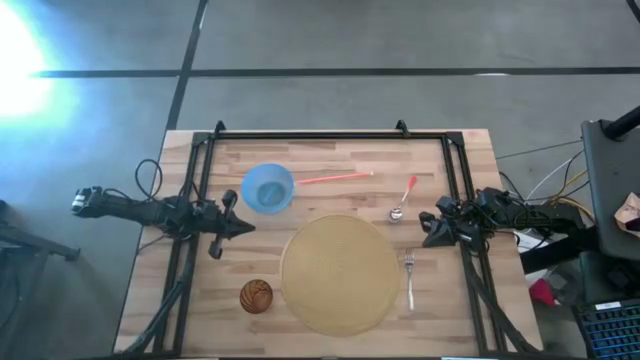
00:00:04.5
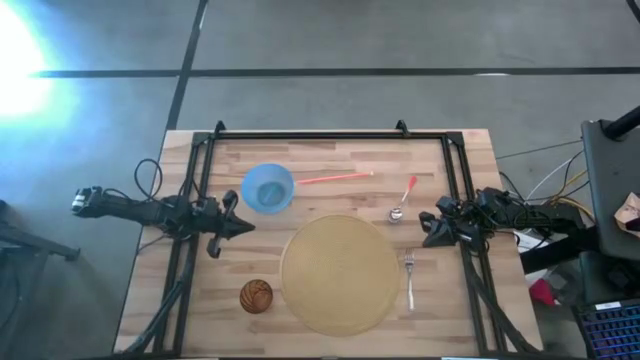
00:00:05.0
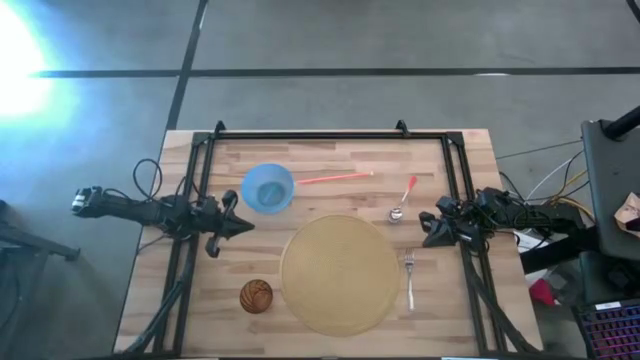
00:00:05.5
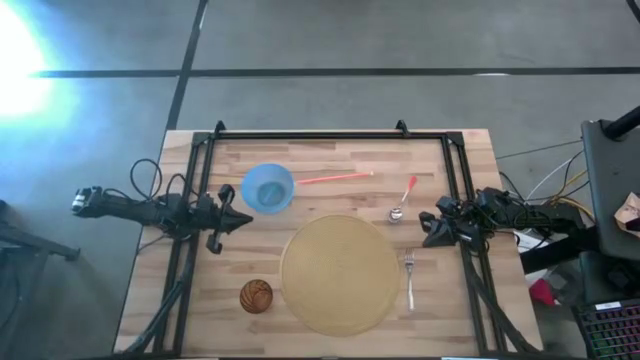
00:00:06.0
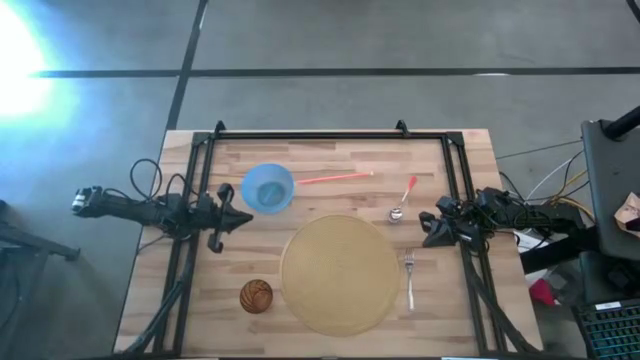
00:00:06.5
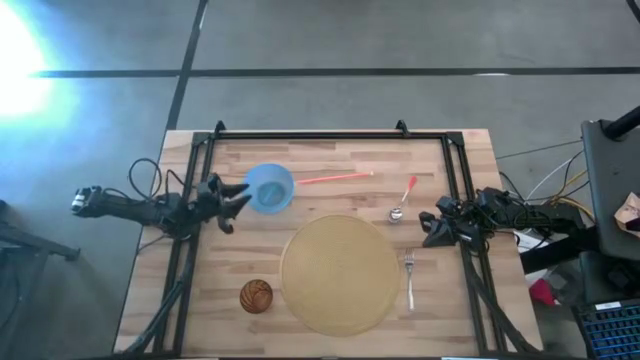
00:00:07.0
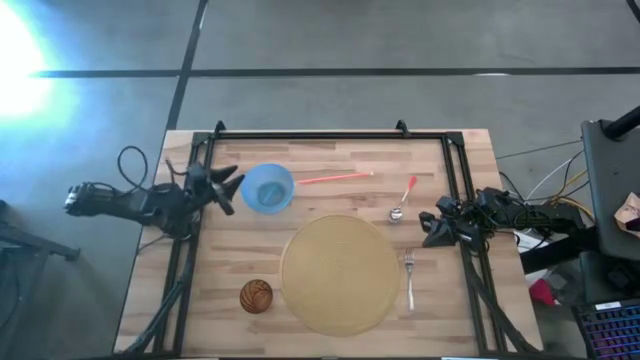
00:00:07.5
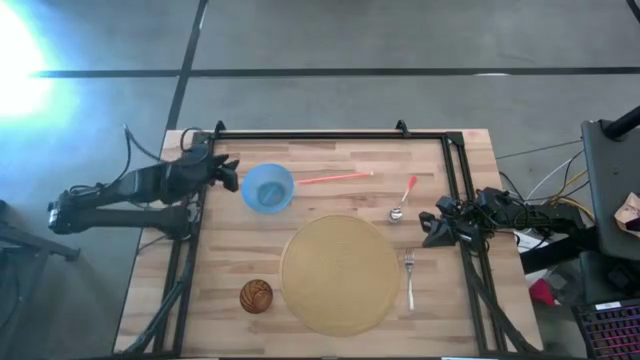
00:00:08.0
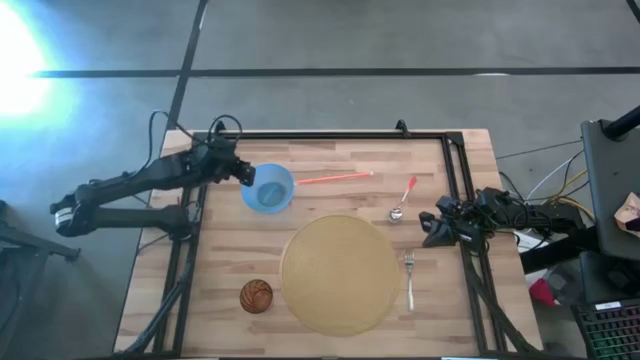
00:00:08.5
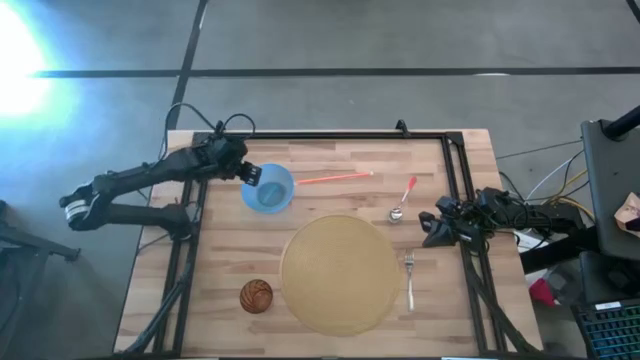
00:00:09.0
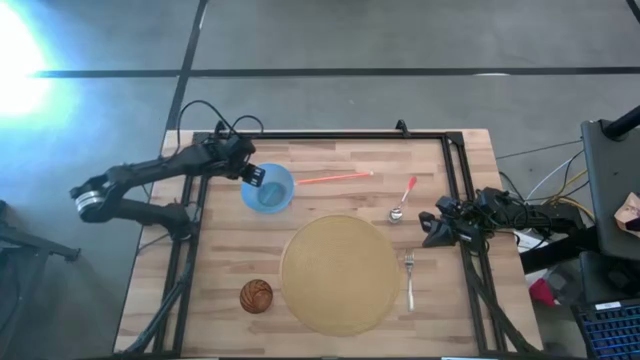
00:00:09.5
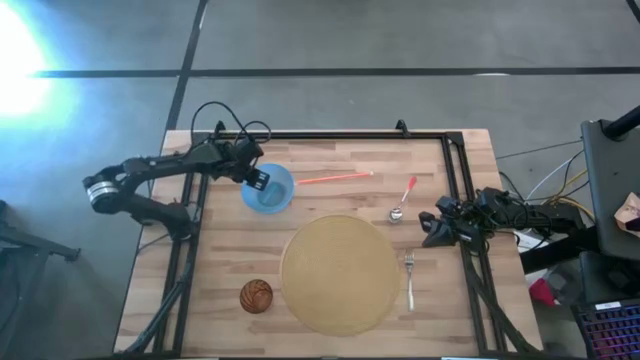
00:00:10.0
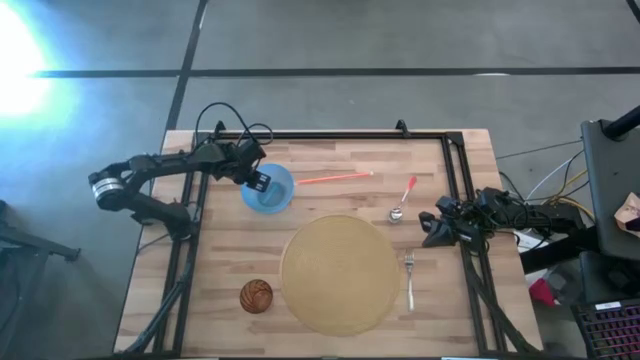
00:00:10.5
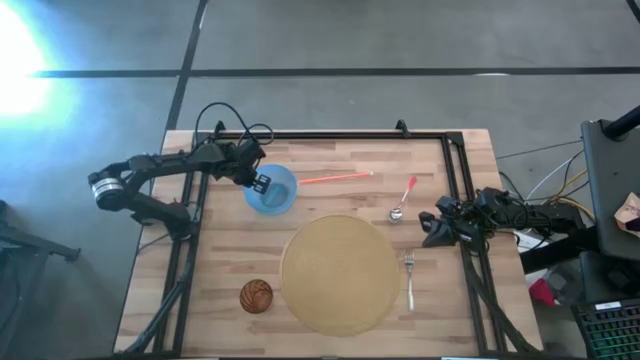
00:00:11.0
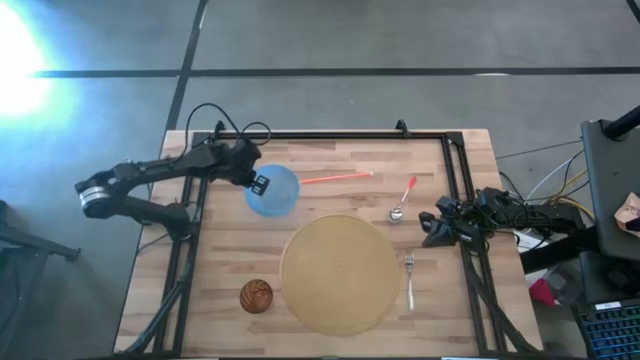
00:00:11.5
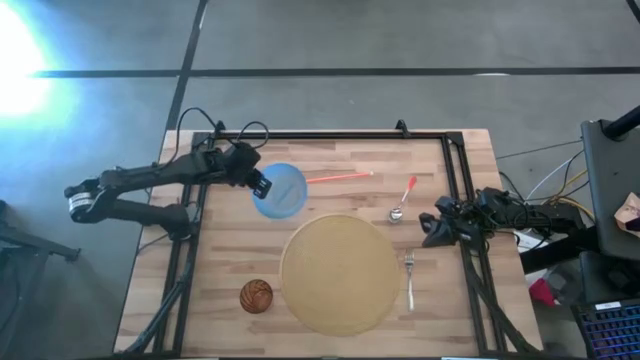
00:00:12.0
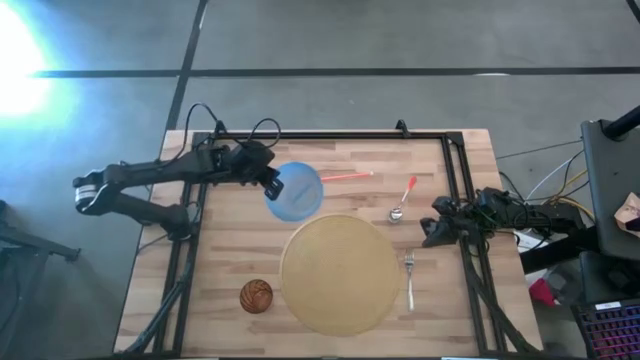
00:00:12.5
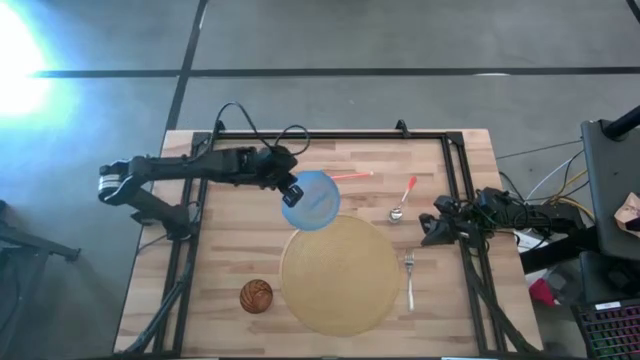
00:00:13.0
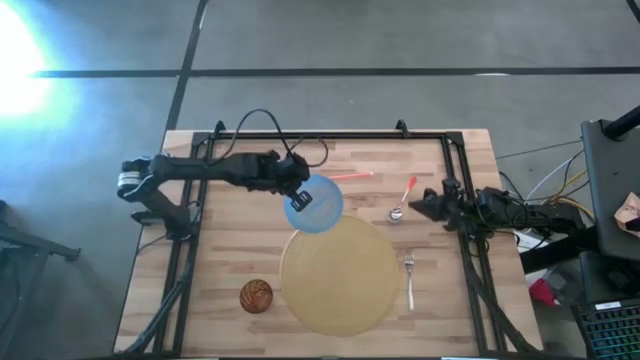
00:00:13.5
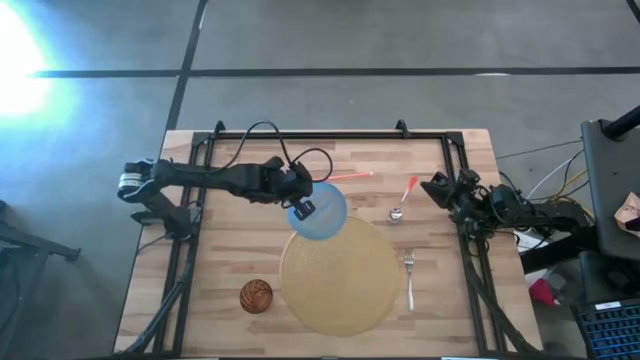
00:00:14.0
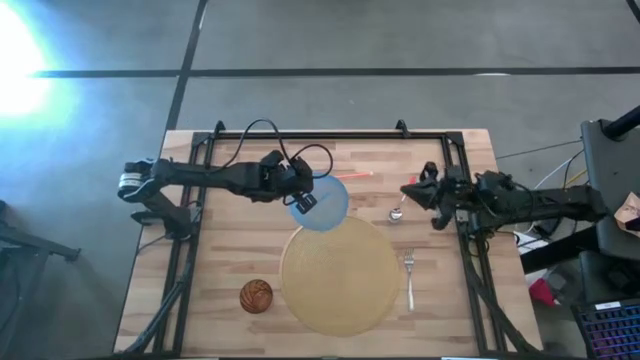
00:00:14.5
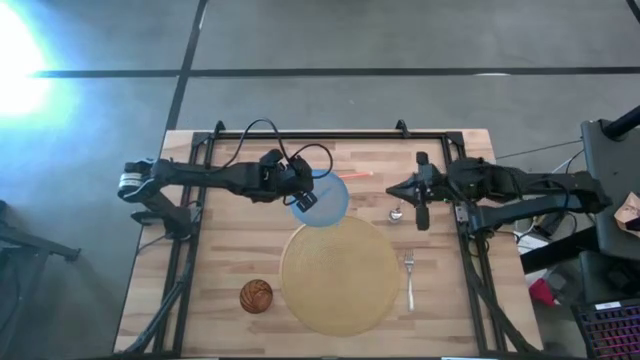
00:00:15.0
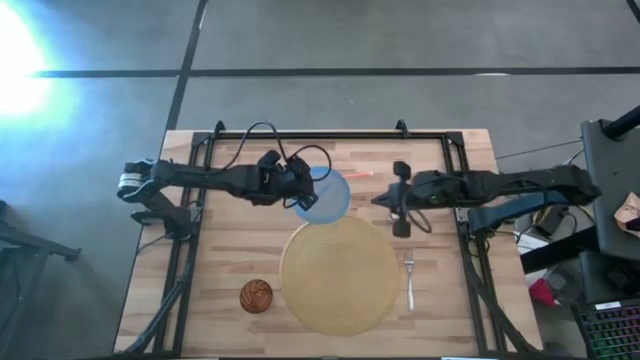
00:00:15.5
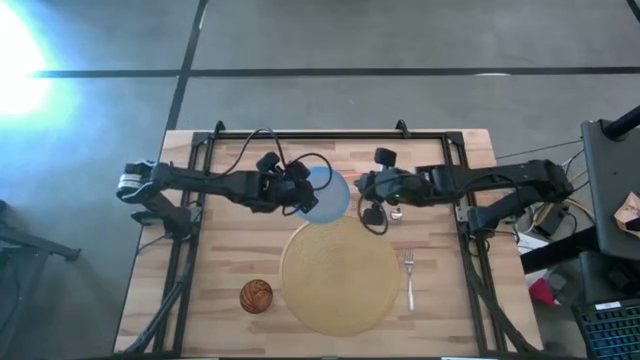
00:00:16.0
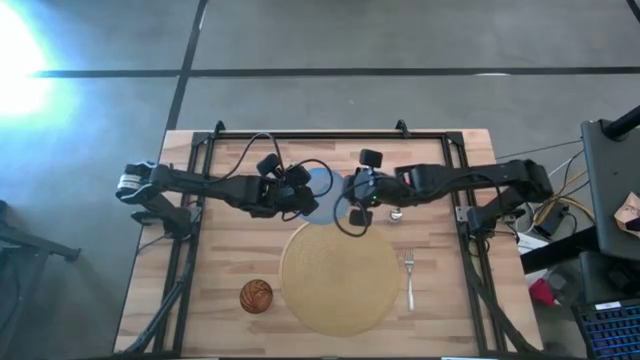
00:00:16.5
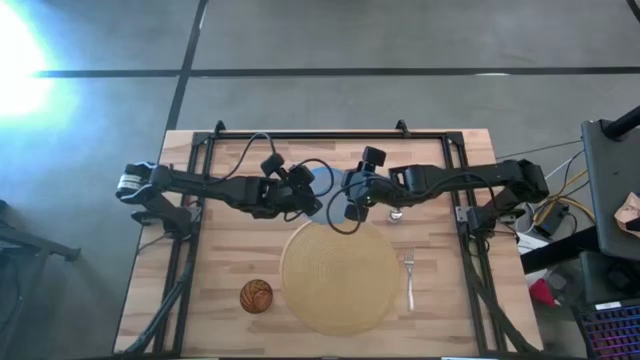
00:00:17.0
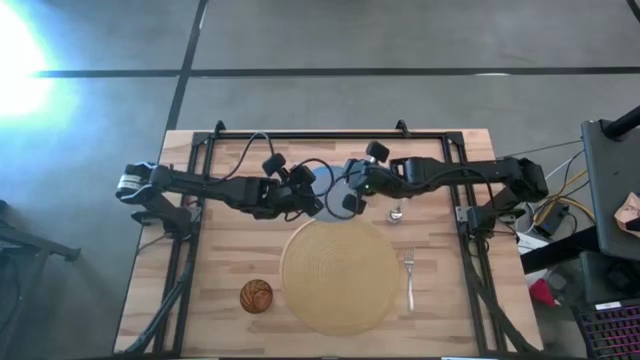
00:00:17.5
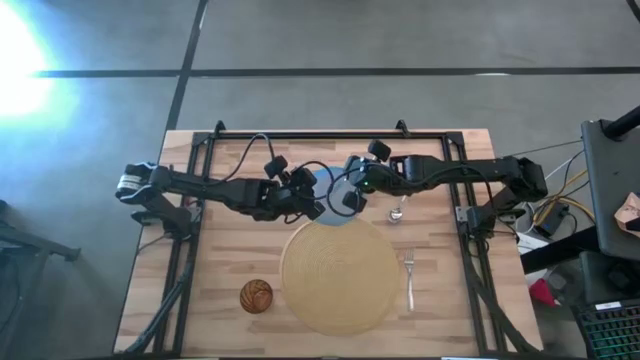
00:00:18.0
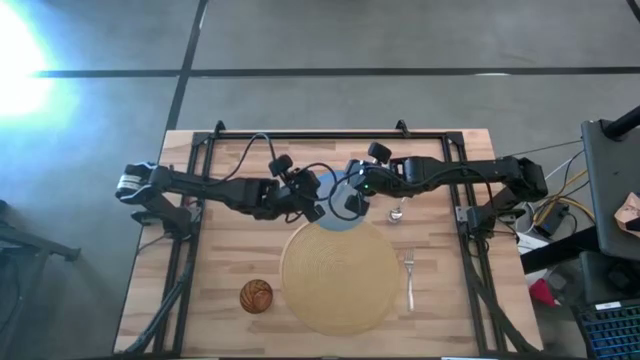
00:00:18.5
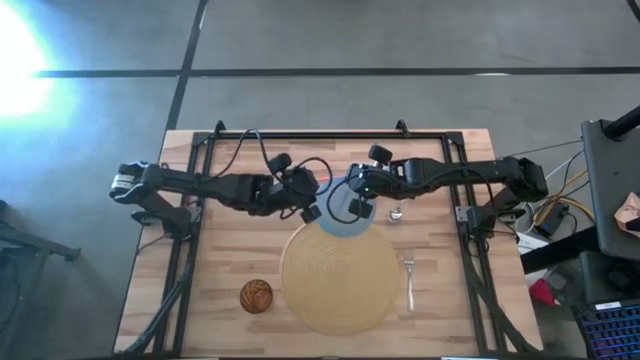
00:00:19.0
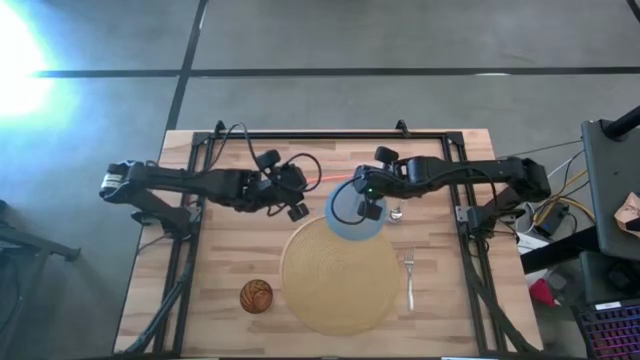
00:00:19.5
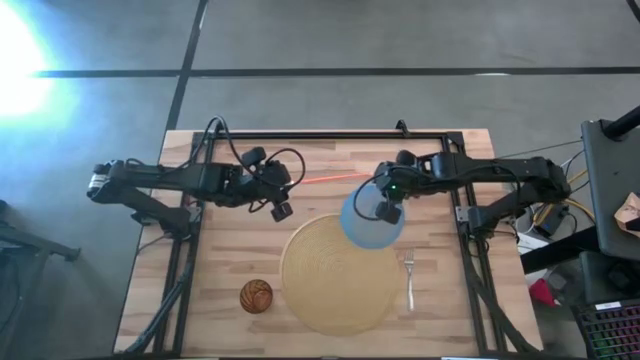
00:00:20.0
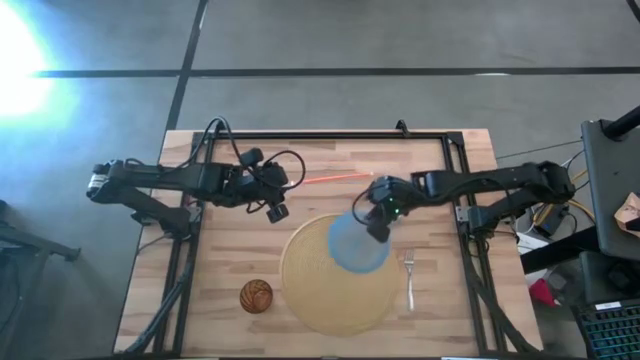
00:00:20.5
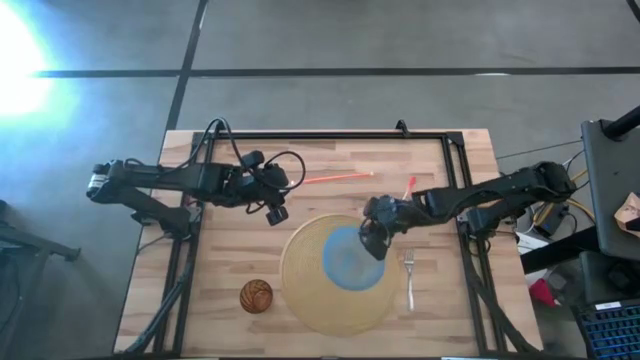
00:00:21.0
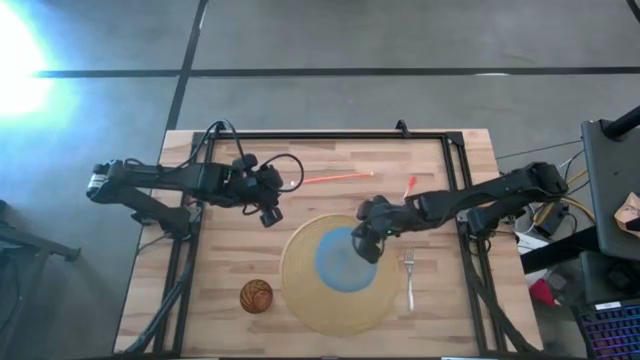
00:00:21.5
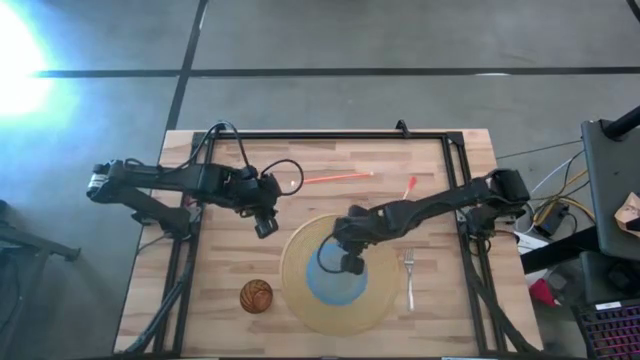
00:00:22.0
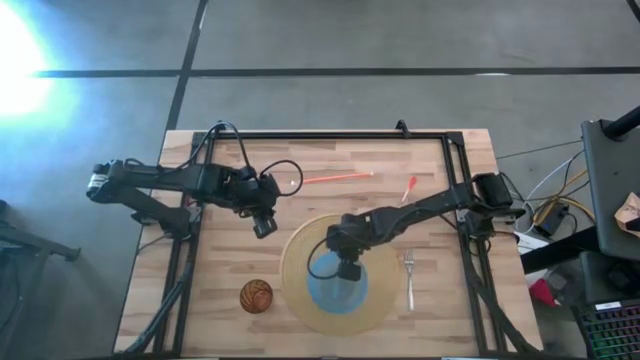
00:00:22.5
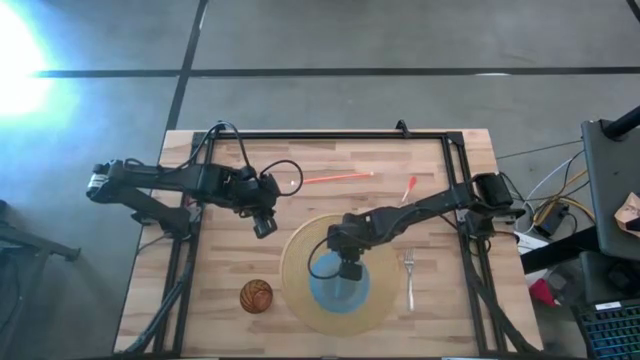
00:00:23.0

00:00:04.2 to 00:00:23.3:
Task: Pick & Place Utensil
Put the bowl on the mat
